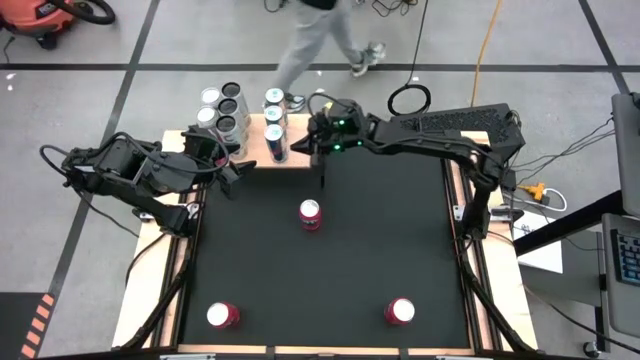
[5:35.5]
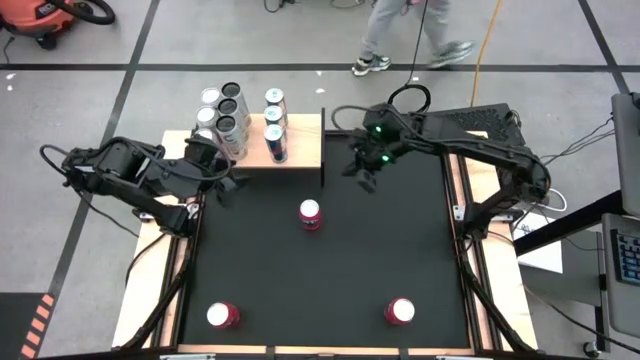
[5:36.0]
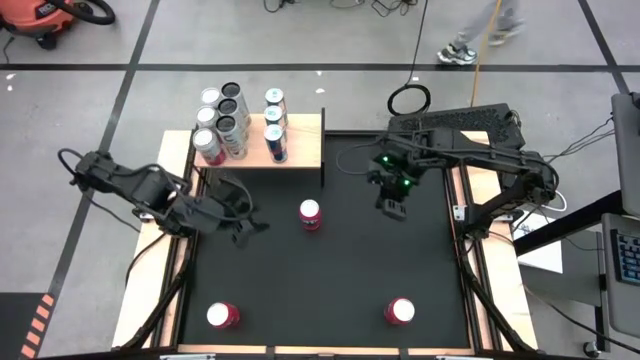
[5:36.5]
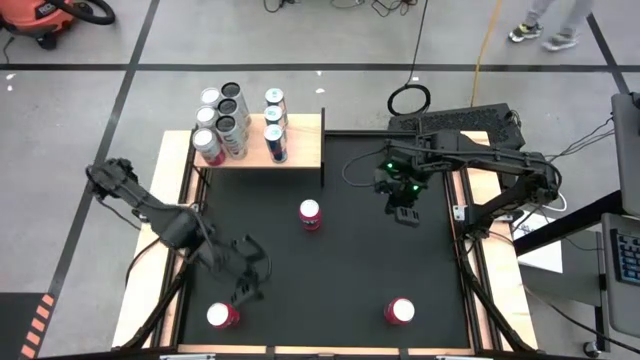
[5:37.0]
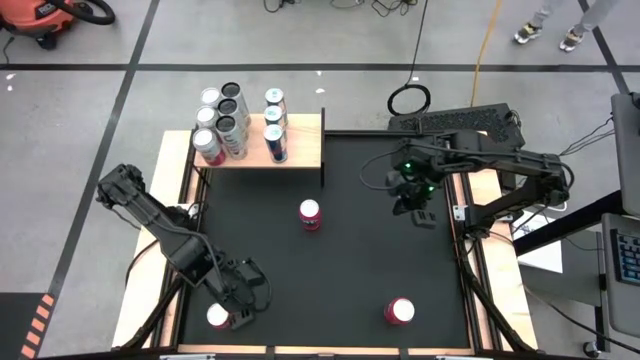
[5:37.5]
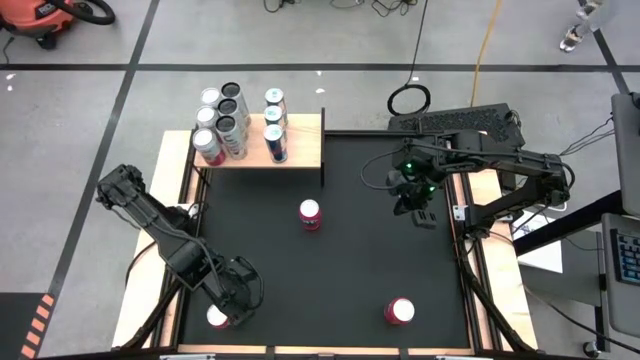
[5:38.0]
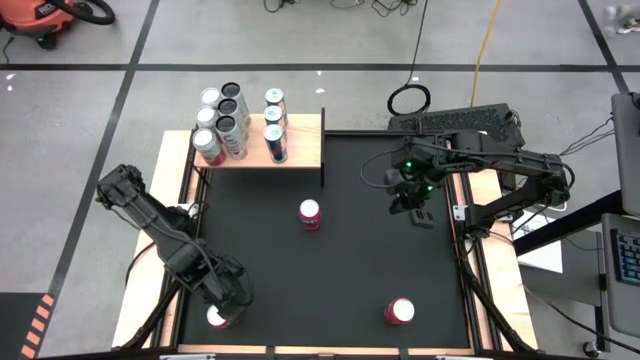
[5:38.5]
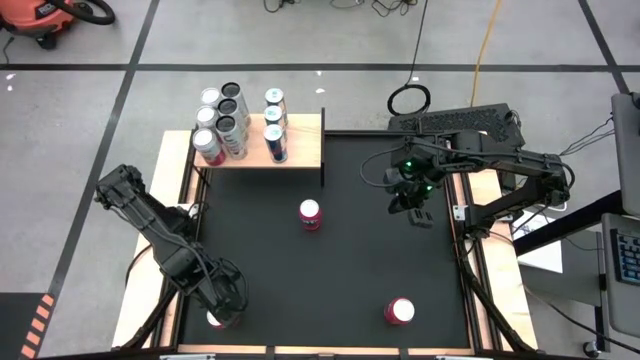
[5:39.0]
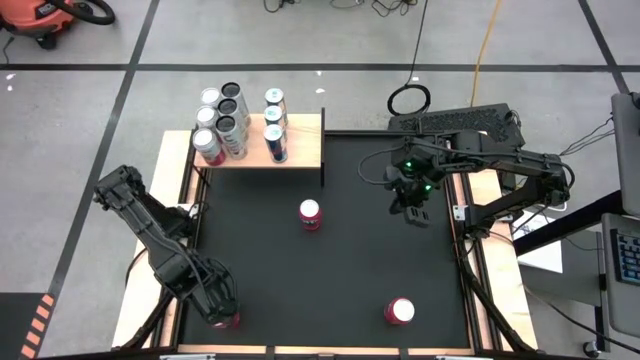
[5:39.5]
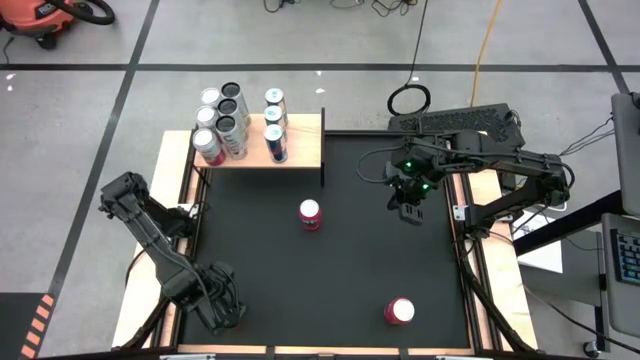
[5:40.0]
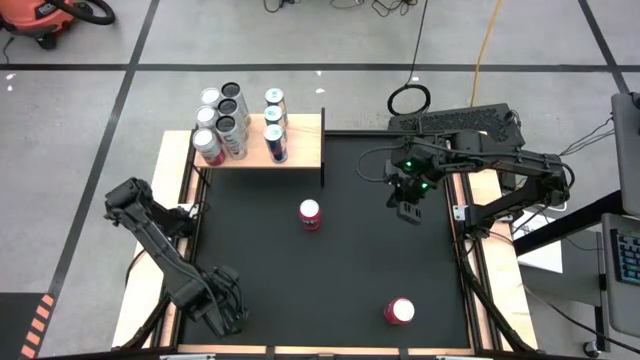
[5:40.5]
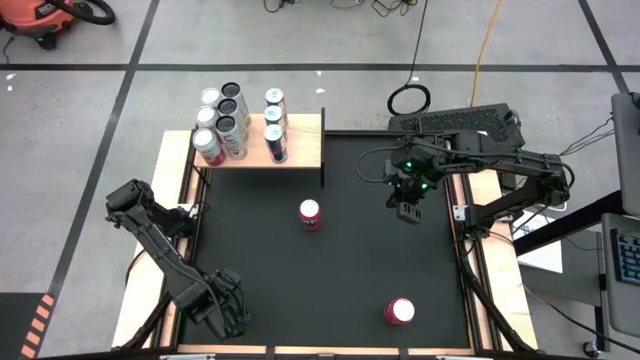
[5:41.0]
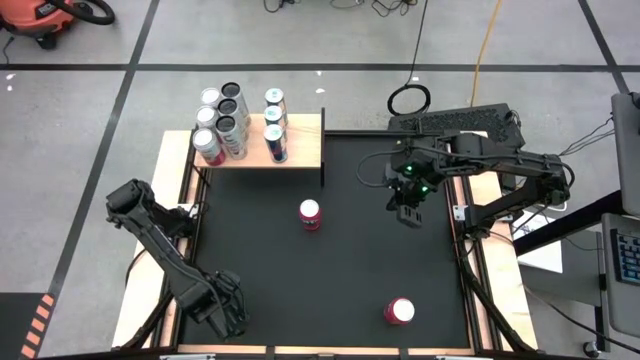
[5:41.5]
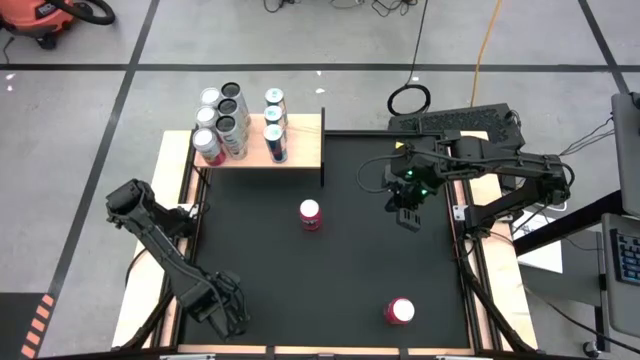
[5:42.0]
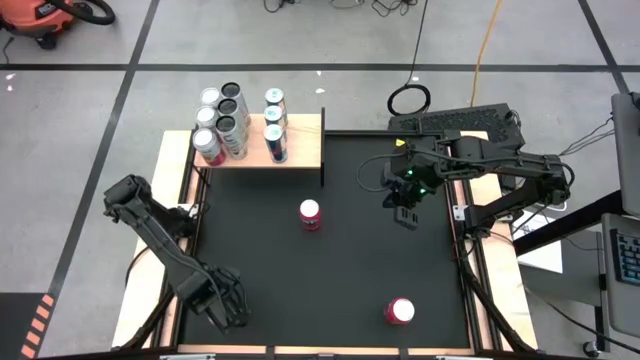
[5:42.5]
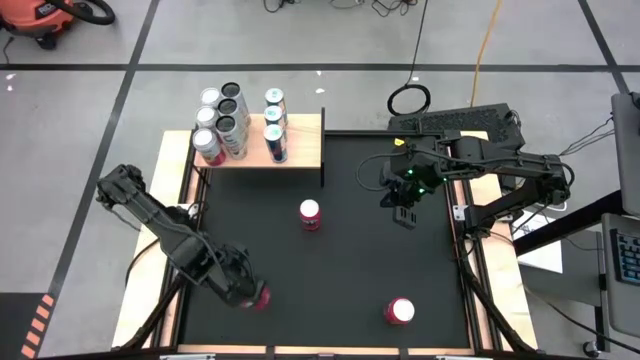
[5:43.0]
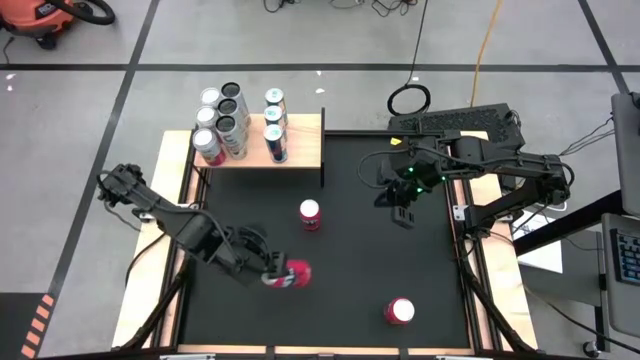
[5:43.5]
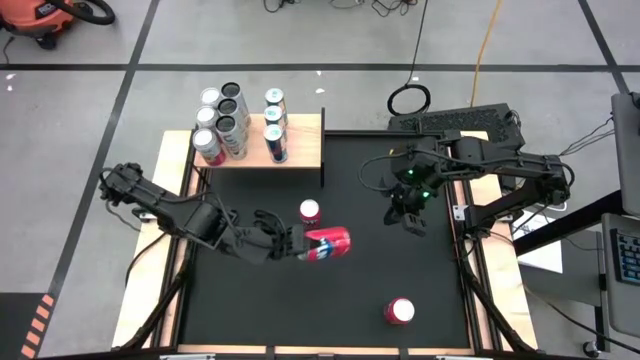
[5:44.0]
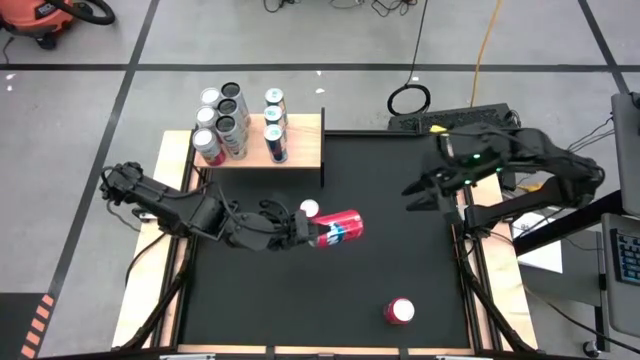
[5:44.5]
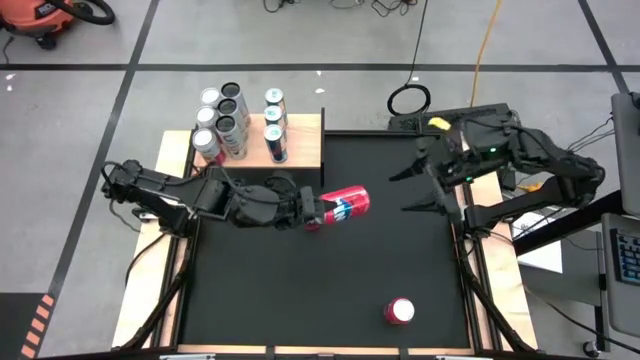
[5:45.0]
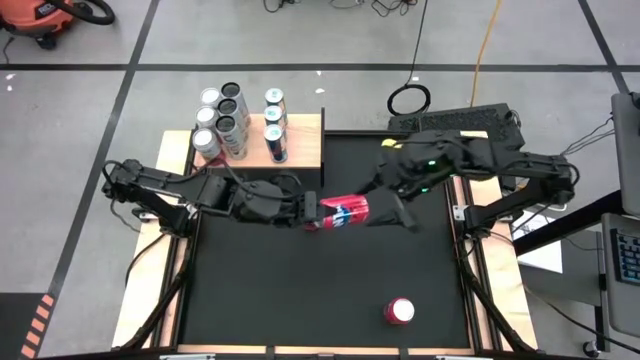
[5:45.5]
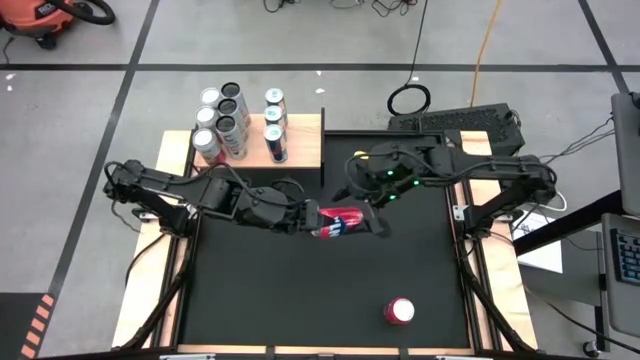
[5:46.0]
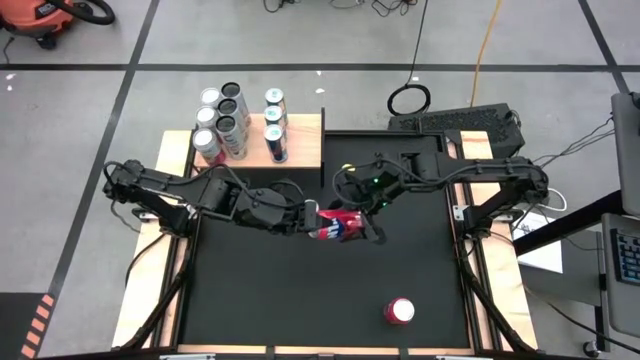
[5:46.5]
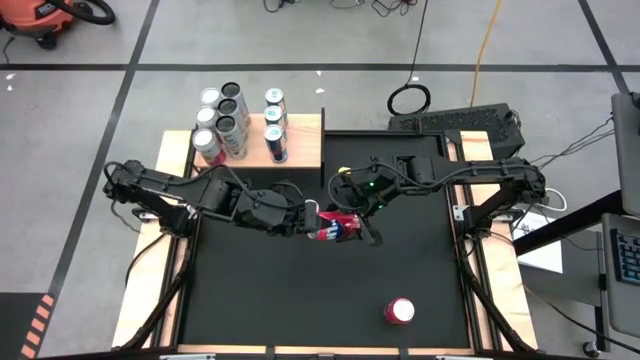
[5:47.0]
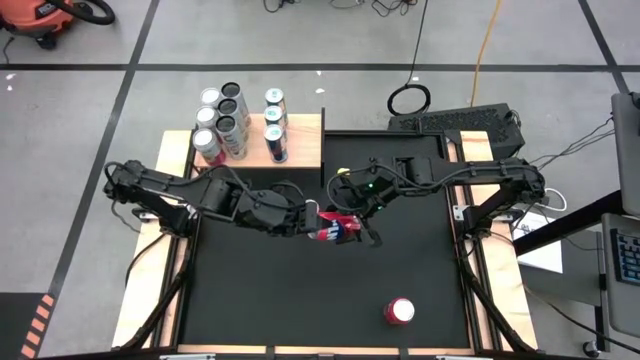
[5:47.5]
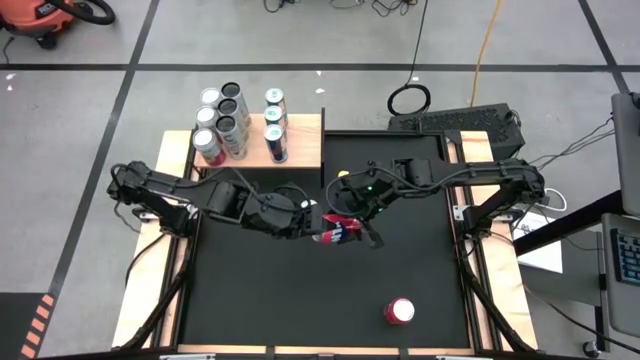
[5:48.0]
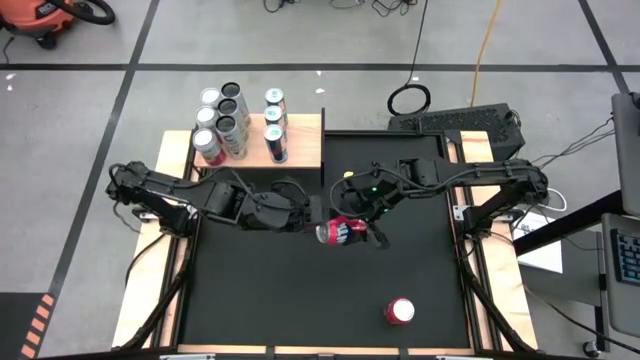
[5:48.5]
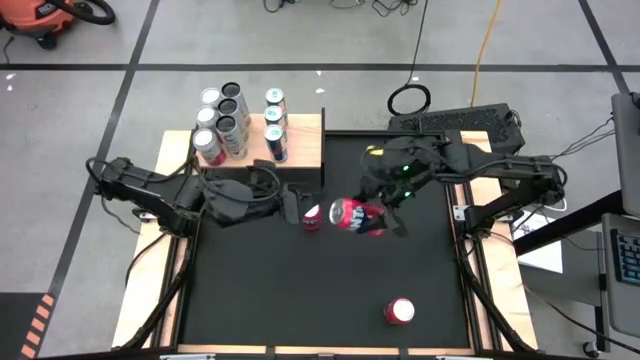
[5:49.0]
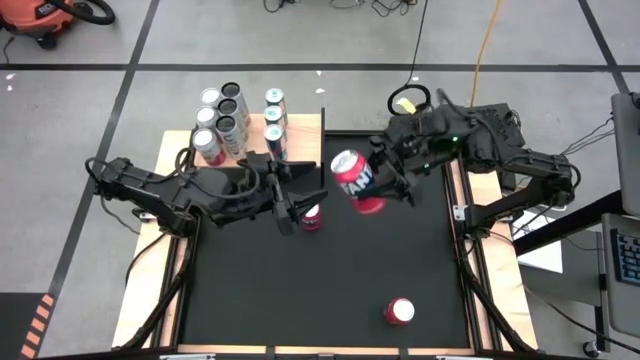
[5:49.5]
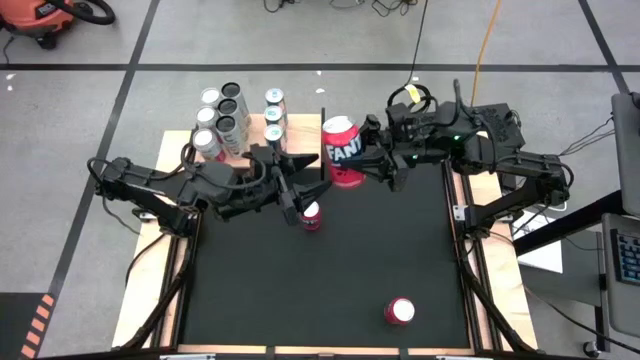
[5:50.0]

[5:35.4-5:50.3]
Task: Place canned beverage on shelf
Put the bottom left red soda can on the shelf

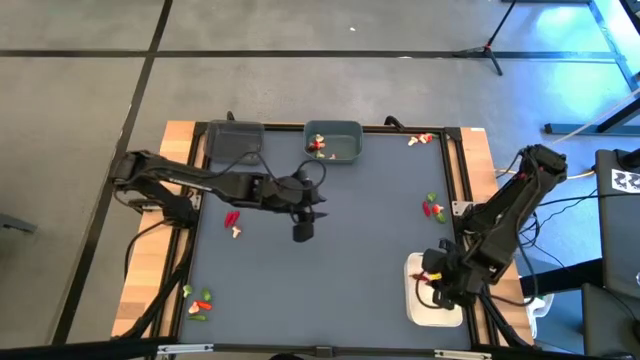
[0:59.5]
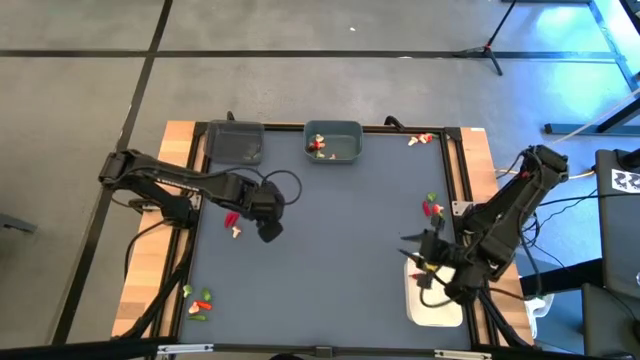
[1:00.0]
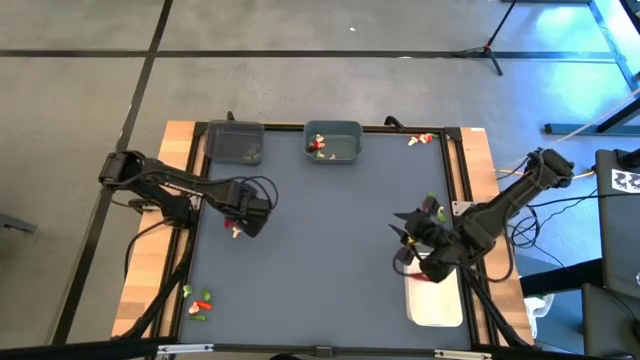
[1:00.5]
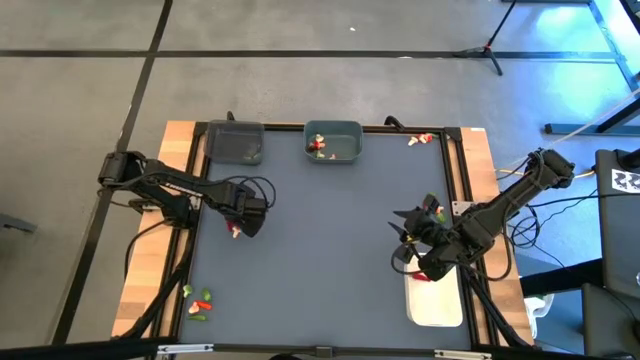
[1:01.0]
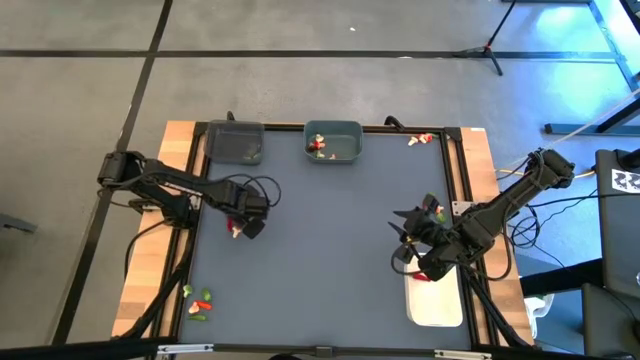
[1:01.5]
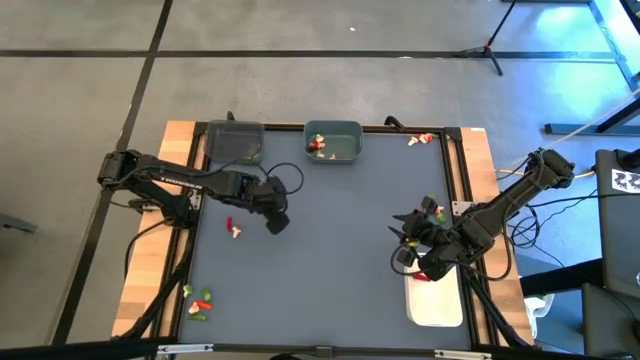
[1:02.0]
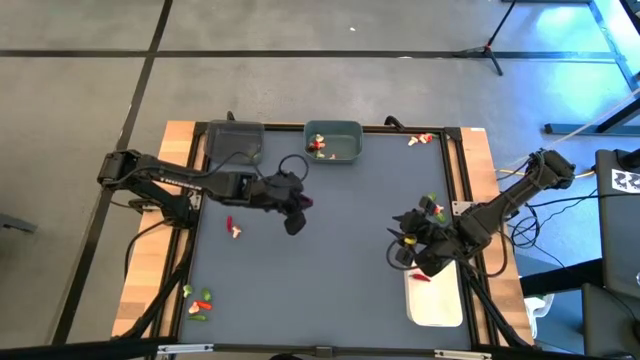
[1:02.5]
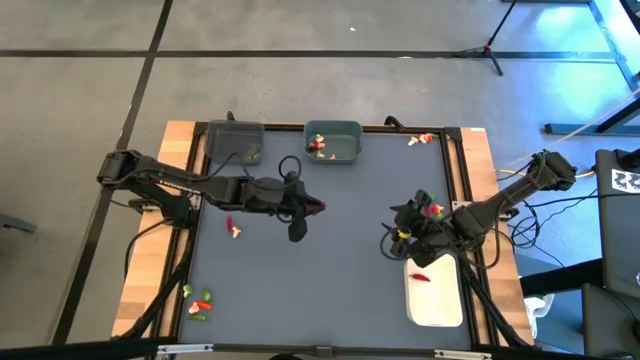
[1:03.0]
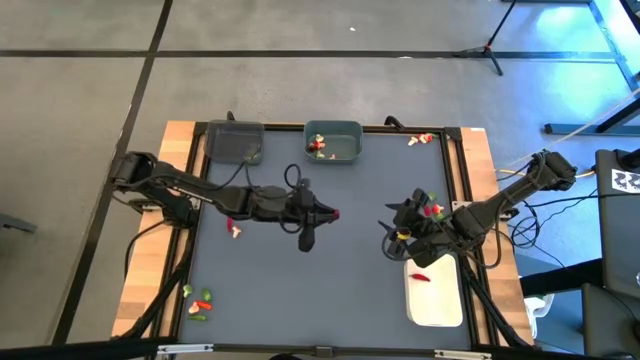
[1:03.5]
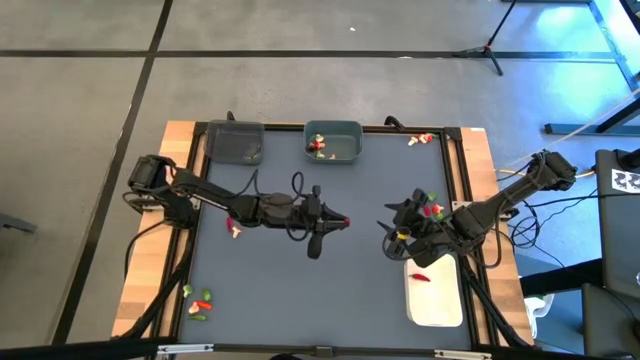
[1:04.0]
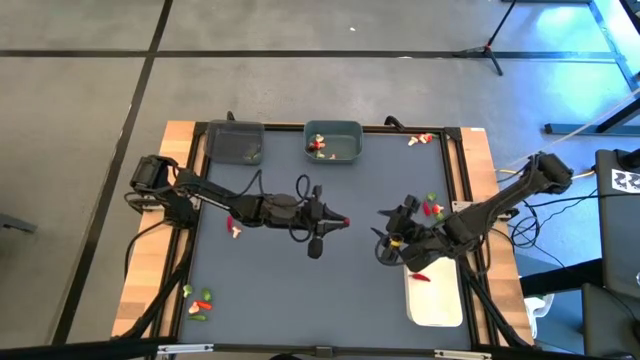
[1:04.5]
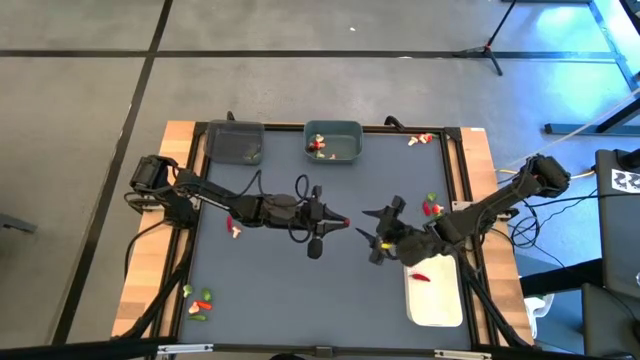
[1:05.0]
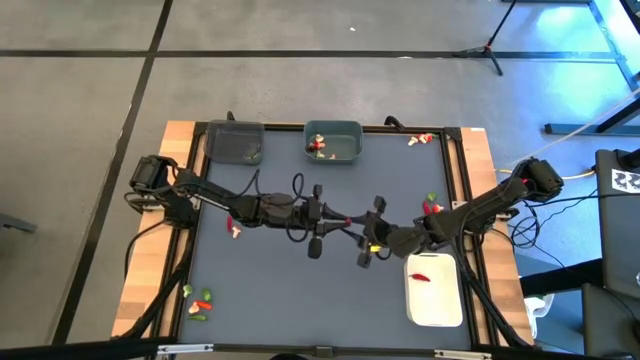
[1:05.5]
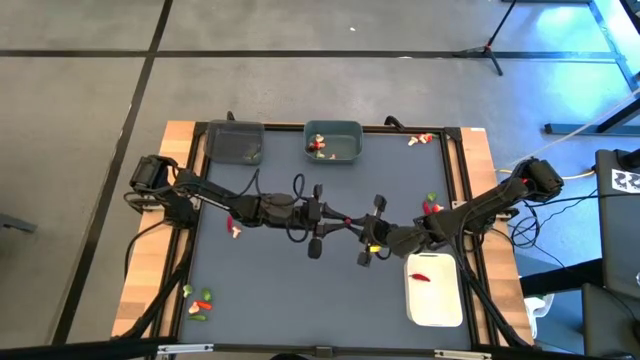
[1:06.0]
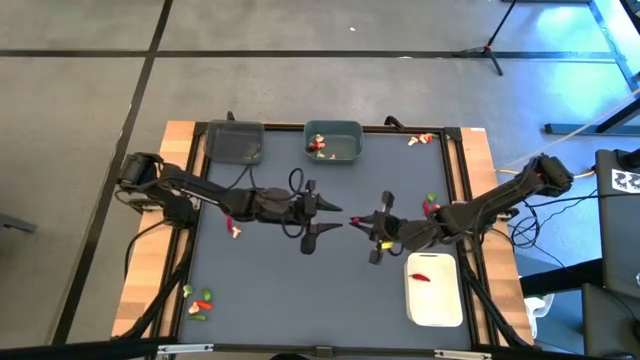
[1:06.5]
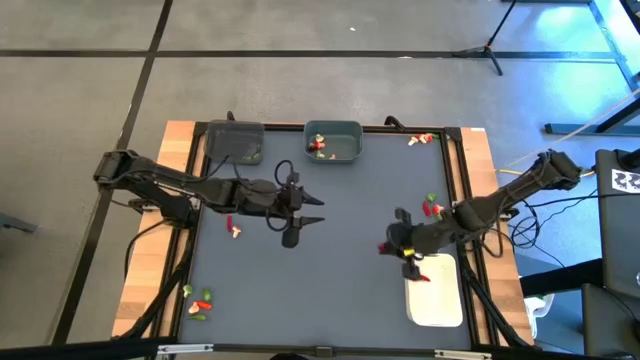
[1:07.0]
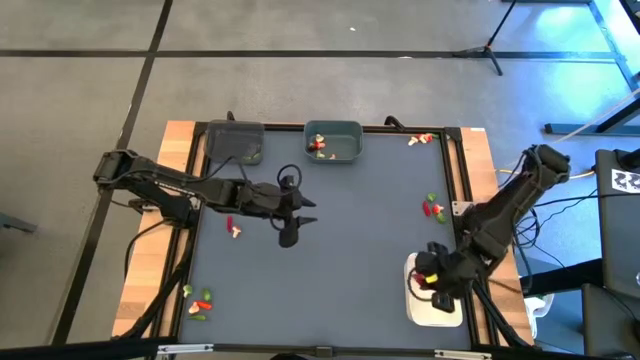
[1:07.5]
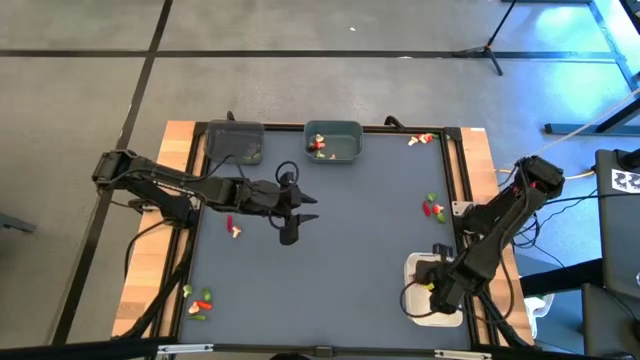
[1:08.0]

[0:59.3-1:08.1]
Task: Sort produce into baskets
Put the red chili pepper into the white bin
